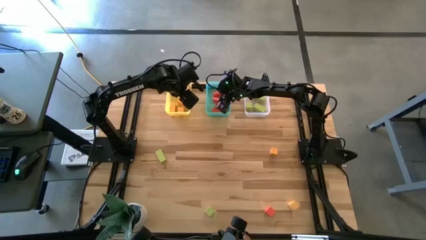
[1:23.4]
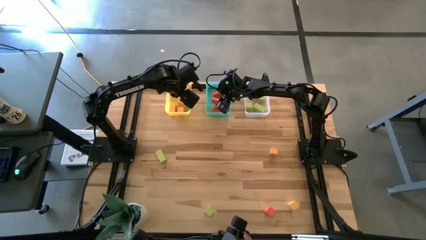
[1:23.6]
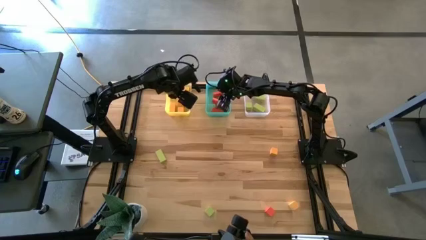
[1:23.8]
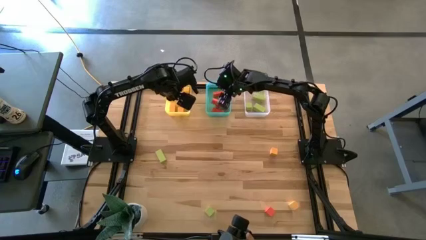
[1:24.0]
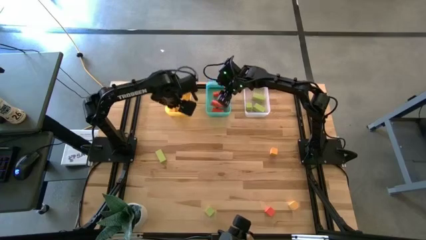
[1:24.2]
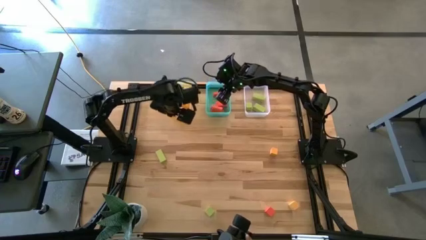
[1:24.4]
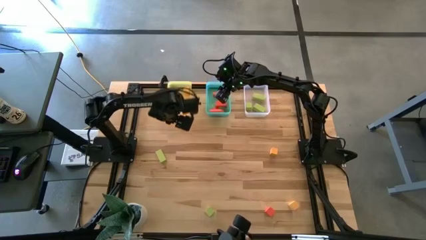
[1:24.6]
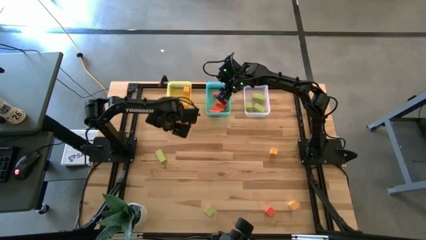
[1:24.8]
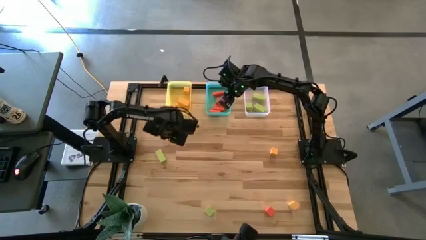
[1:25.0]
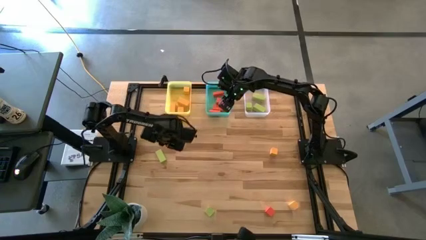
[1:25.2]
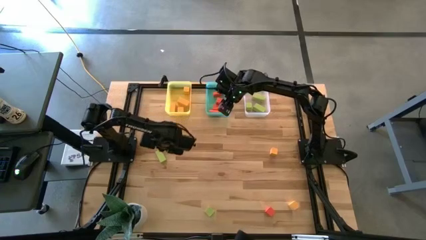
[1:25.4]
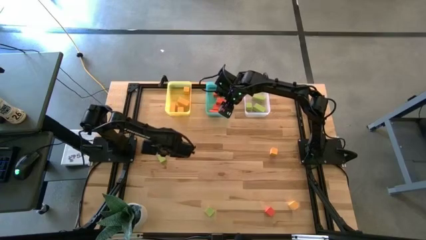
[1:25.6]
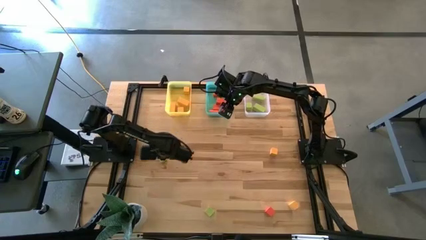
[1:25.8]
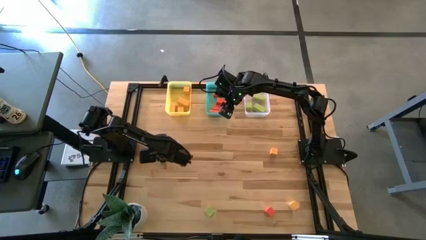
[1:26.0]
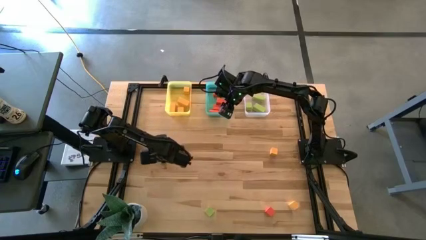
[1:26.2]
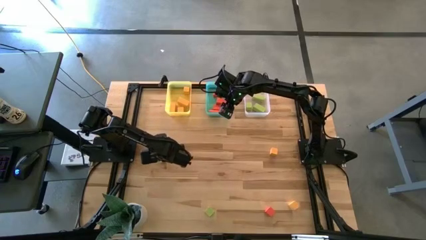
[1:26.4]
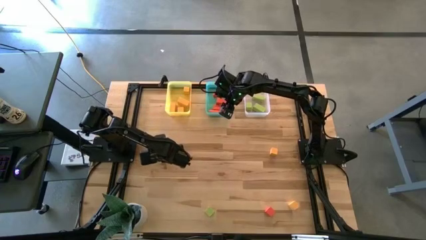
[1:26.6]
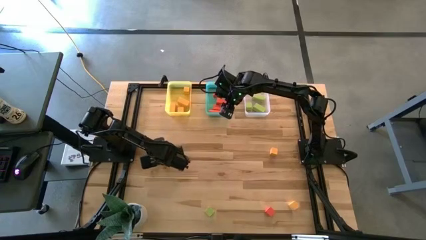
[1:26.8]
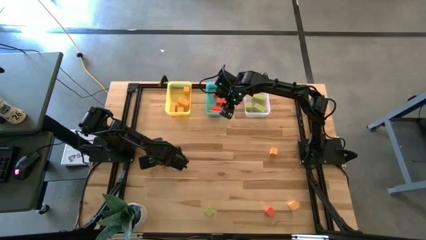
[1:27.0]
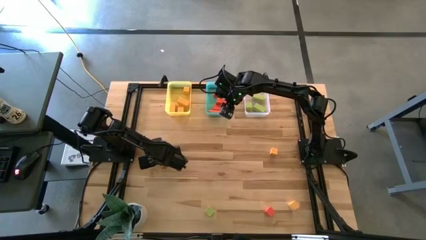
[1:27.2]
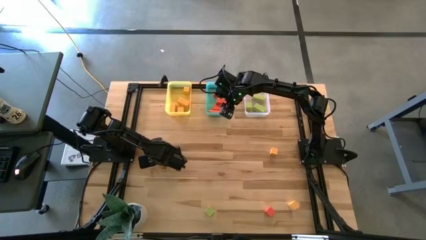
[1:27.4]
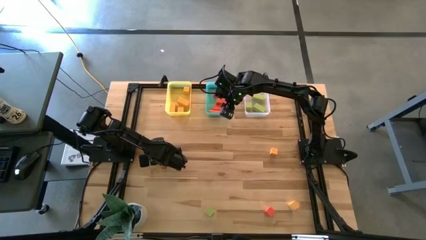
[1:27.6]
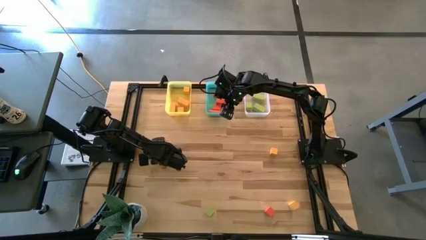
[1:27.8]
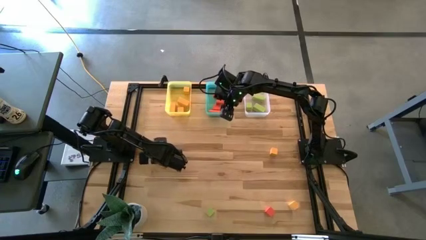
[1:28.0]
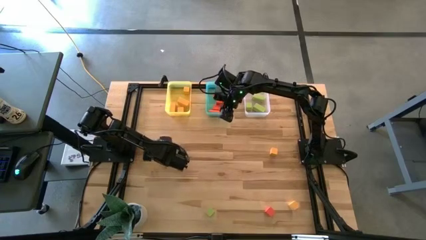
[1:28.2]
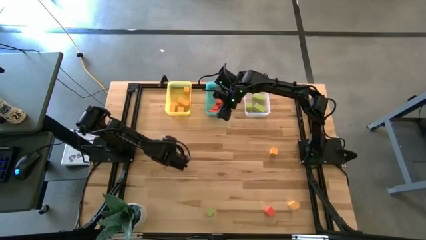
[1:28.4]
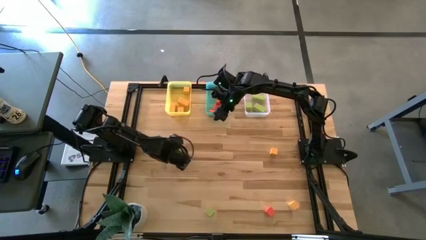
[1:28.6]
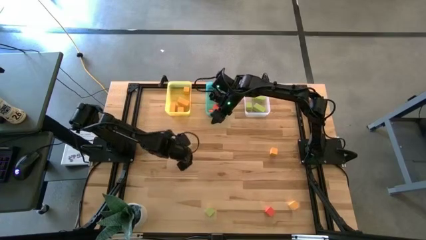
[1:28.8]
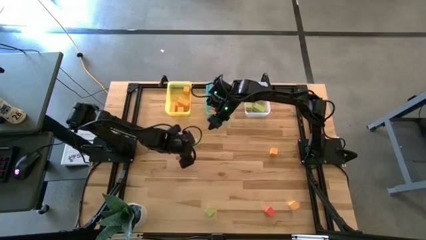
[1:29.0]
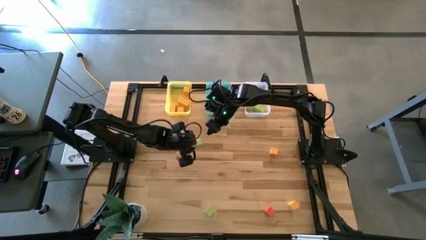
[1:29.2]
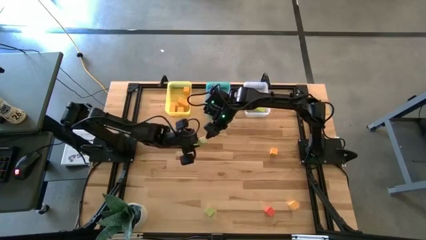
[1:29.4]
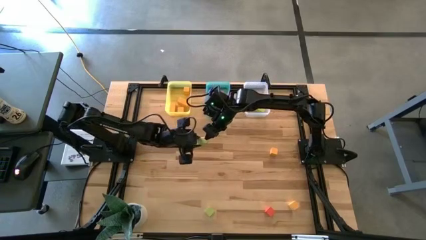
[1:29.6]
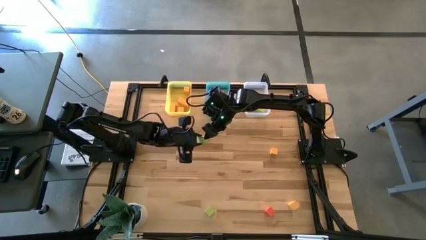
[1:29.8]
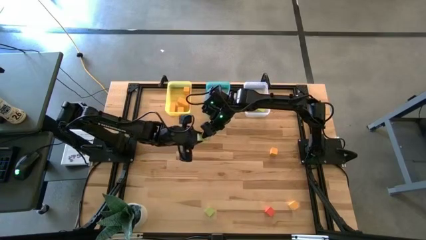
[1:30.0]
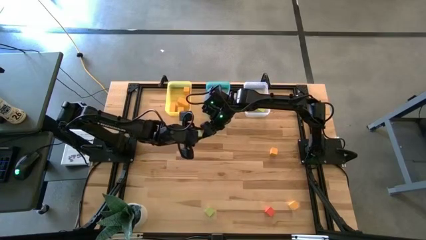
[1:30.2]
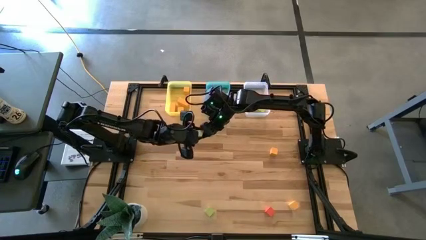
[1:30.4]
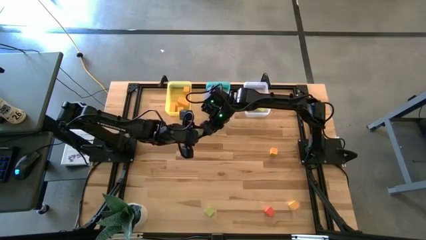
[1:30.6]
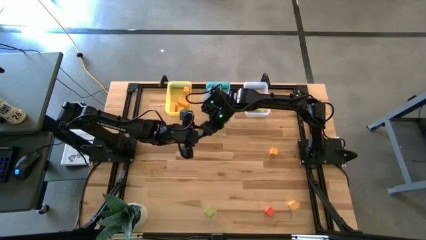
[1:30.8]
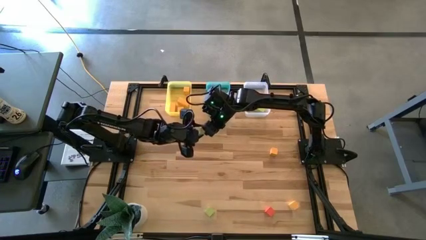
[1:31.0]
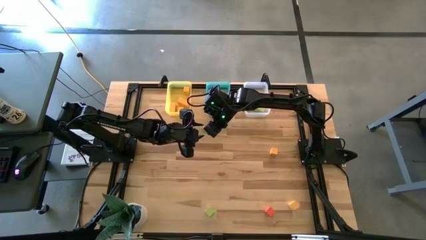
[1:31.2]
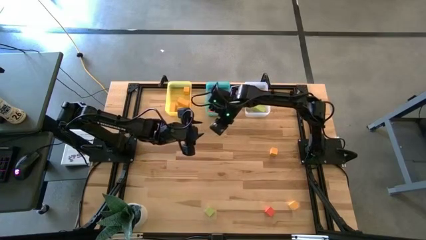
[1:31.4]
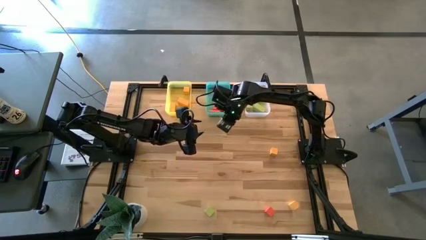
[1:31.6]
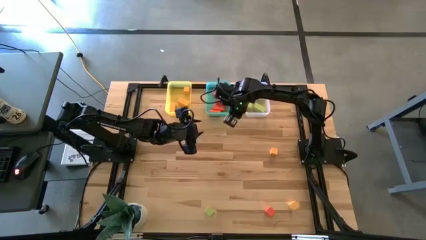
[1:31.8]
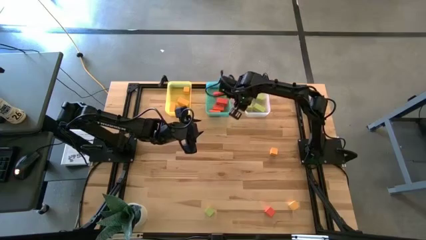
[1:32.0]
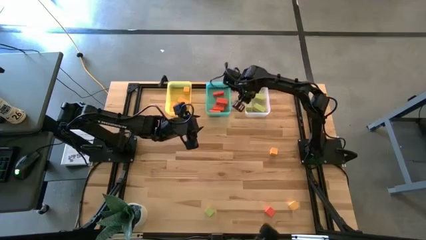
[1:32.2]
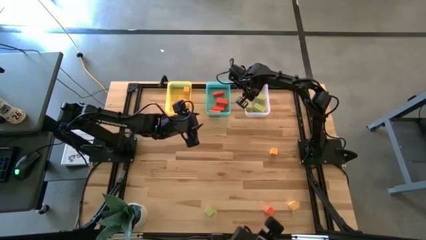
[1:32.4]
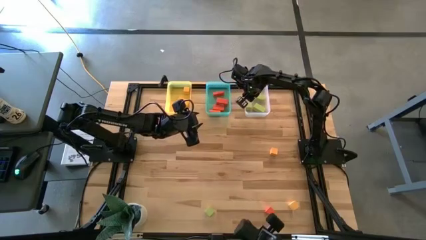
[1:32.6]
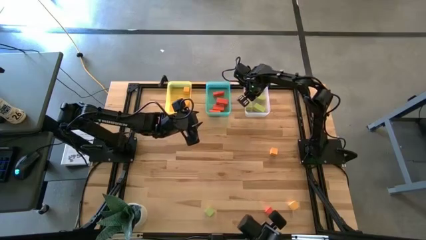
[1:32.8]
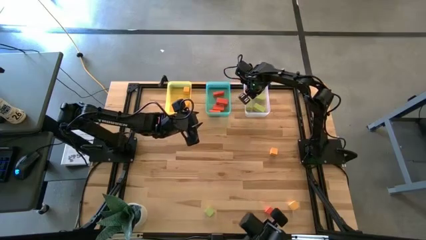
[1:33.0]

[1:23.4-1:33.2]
Task: Sort & place blocks by color
Put the light green block into the white bin
